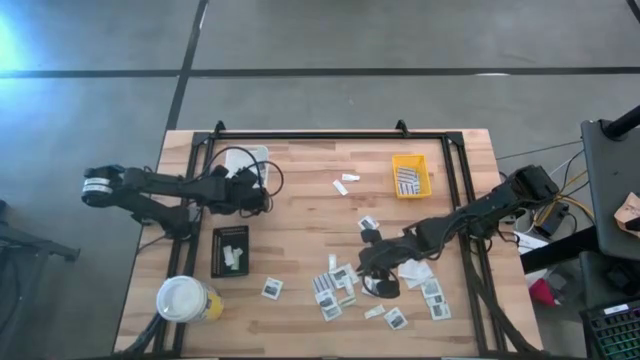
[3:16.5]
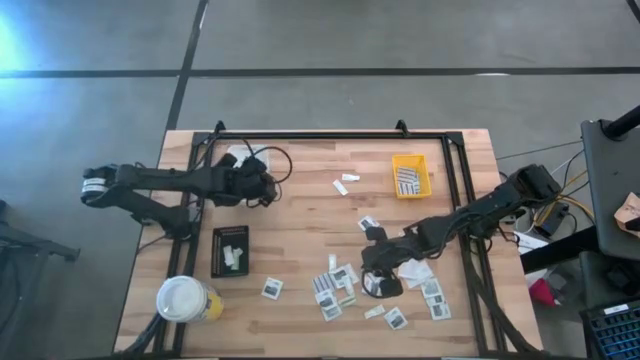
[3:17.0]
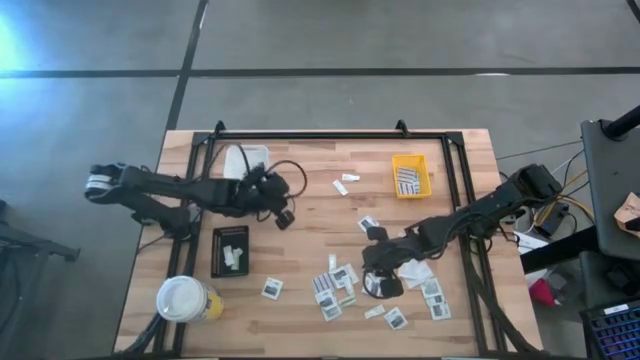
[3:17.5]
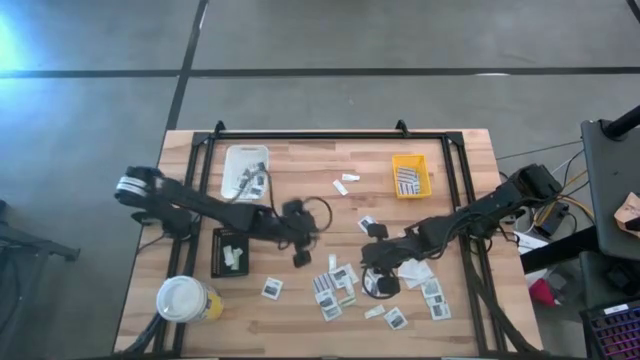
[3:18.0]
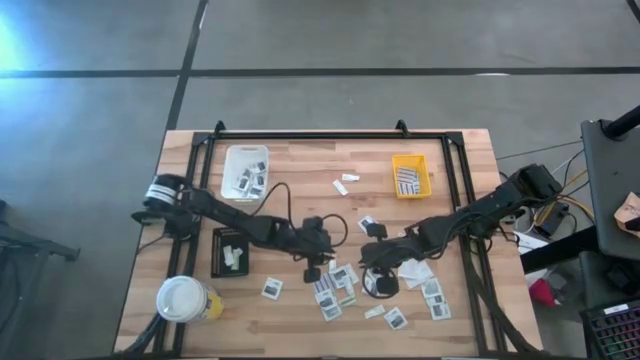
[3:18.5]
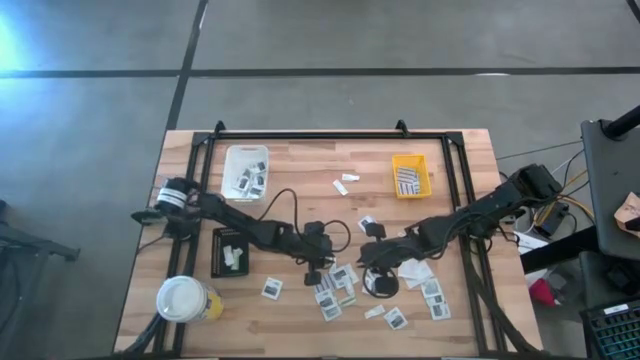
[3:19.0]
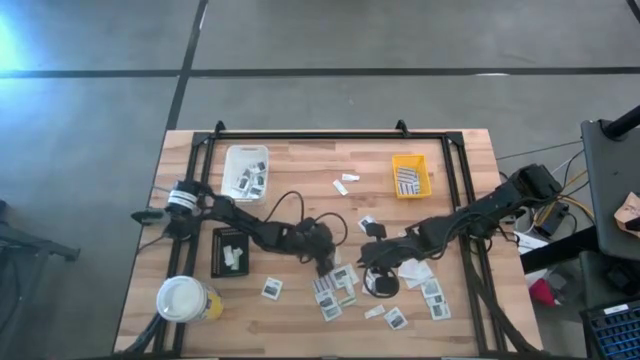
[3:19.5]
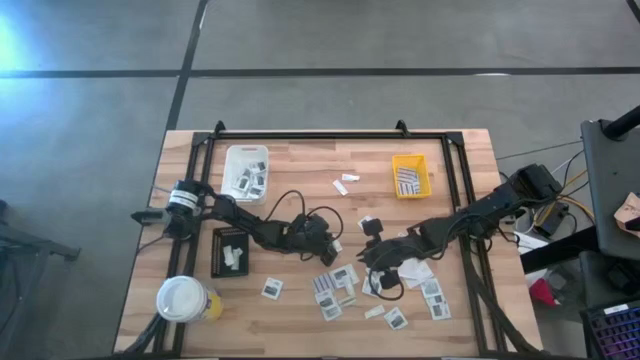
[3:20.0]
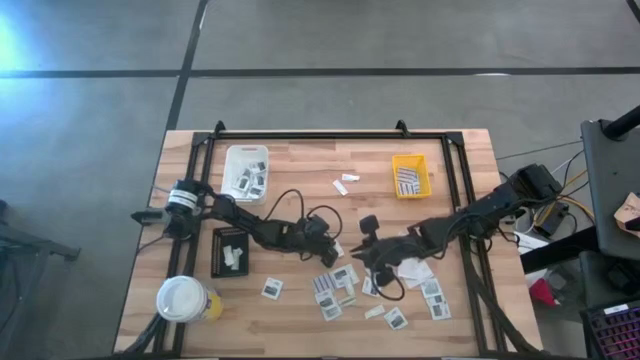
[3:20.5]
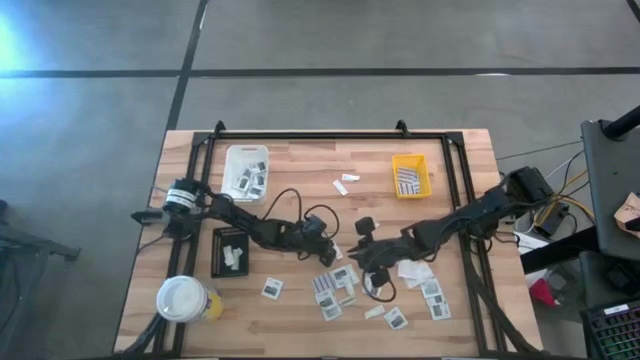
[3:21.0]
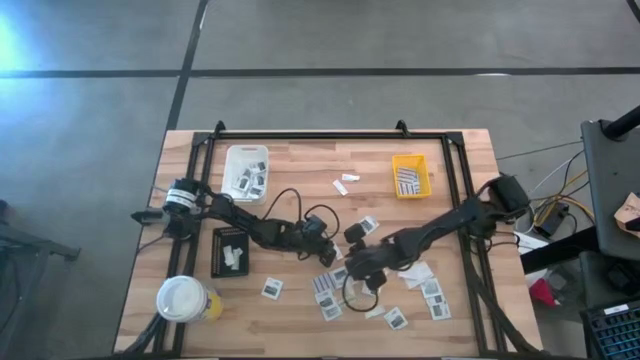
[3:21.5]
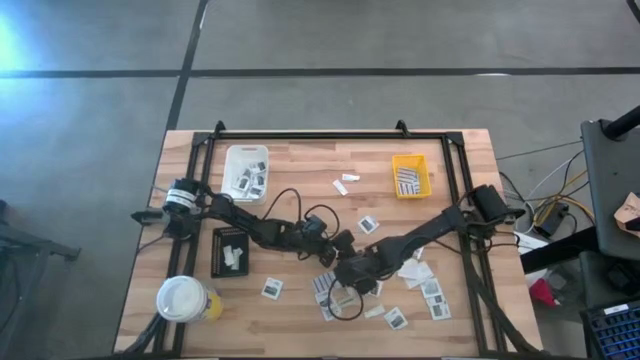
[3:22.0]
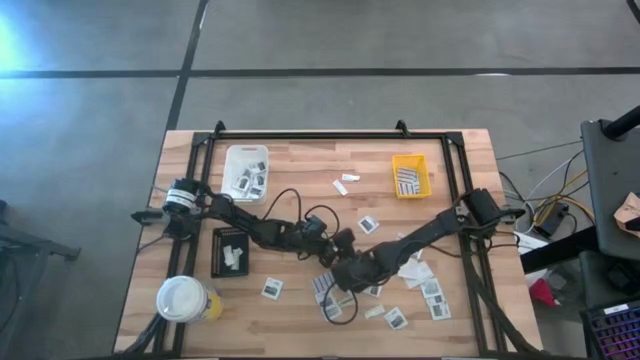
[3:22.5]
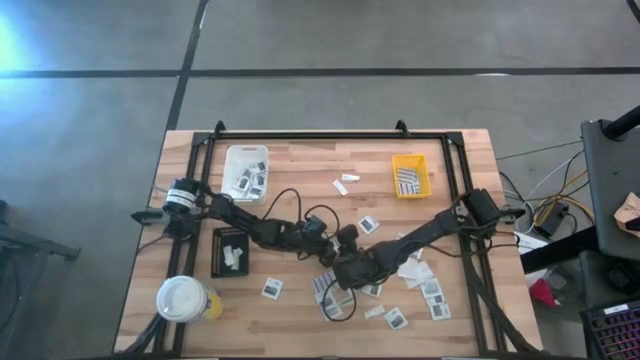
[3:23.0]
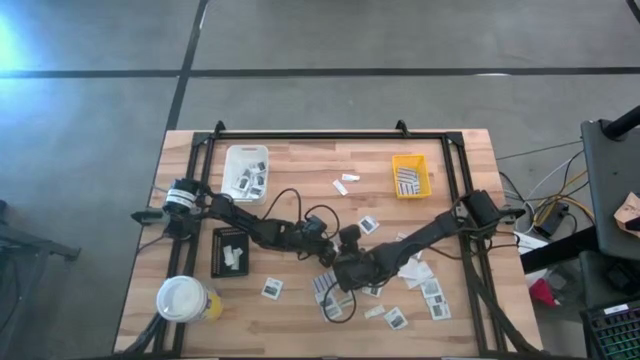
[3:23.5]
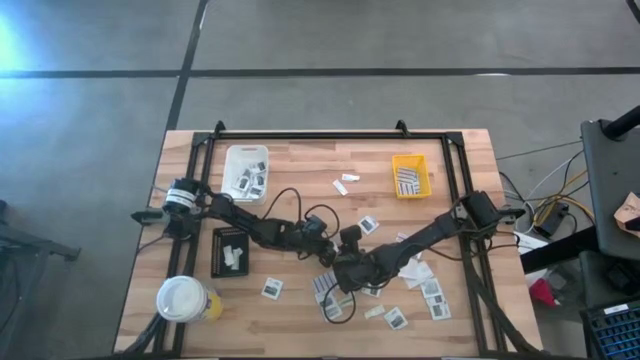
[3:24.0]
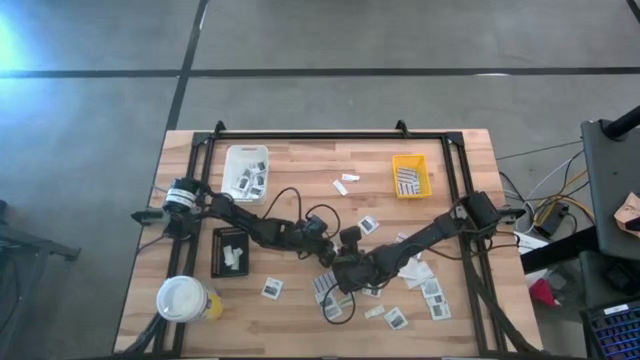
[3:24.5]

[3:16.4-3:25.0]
Task: Pick & Place First Aid Supplies
Put the green bandage pack into the black bin

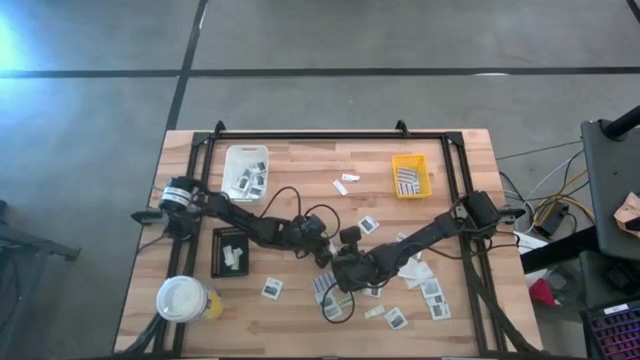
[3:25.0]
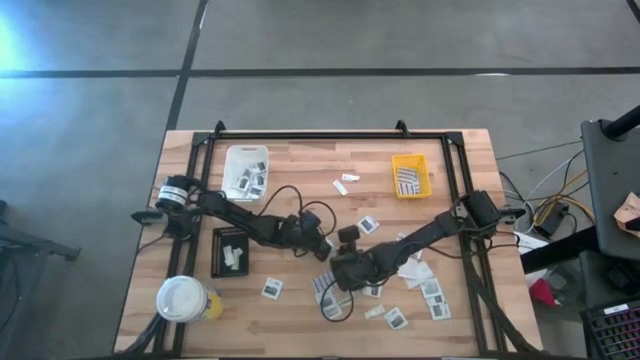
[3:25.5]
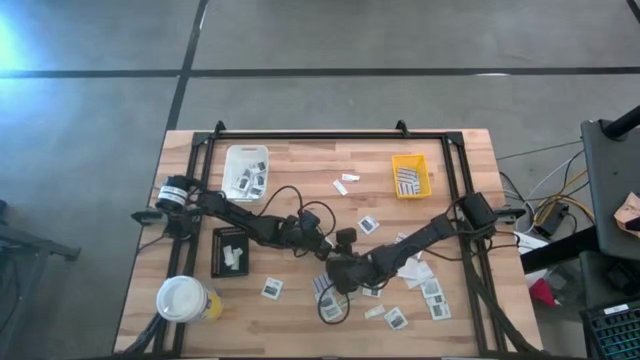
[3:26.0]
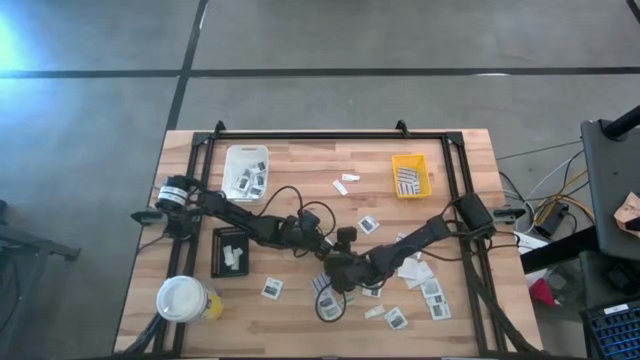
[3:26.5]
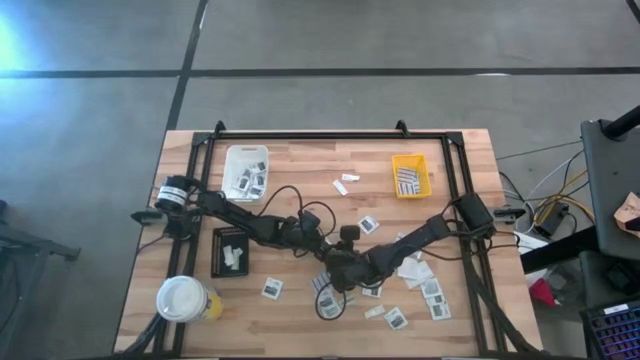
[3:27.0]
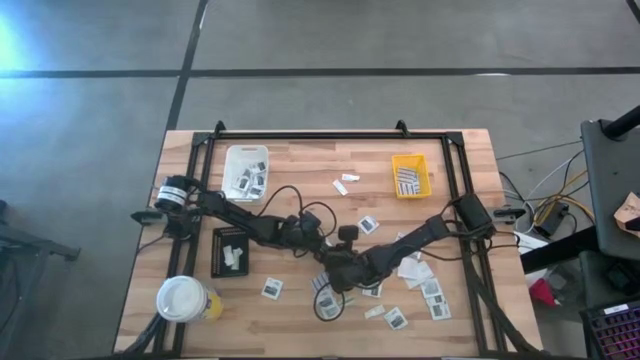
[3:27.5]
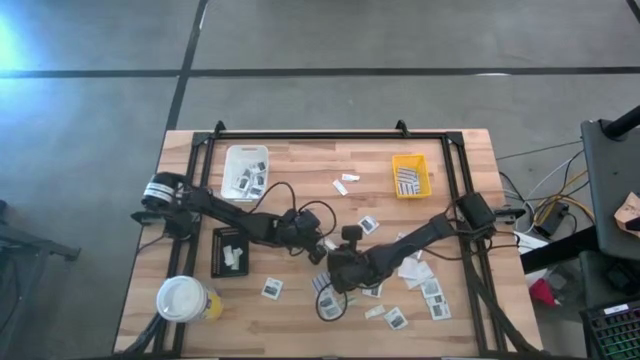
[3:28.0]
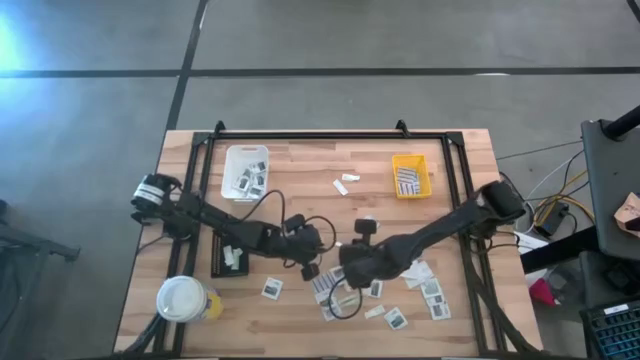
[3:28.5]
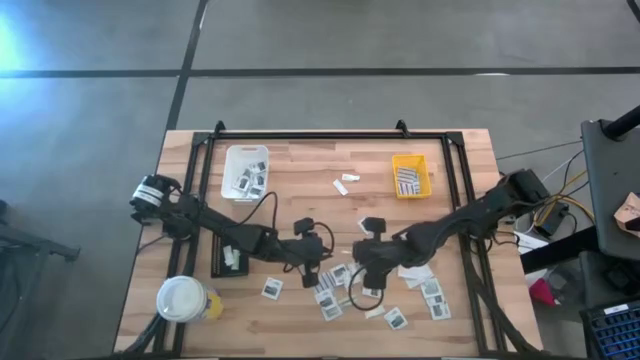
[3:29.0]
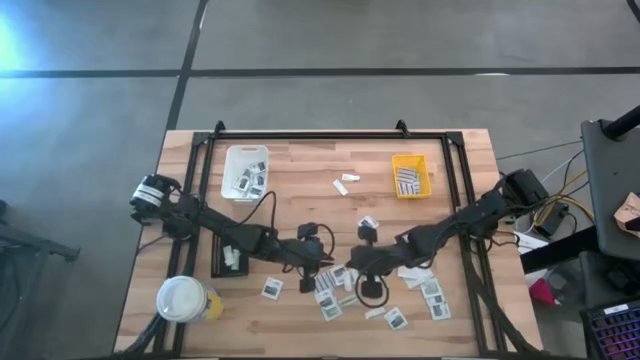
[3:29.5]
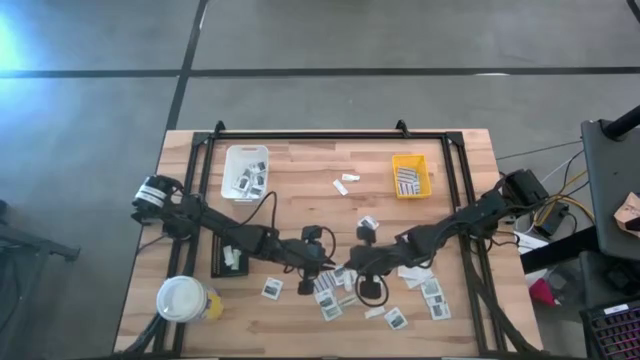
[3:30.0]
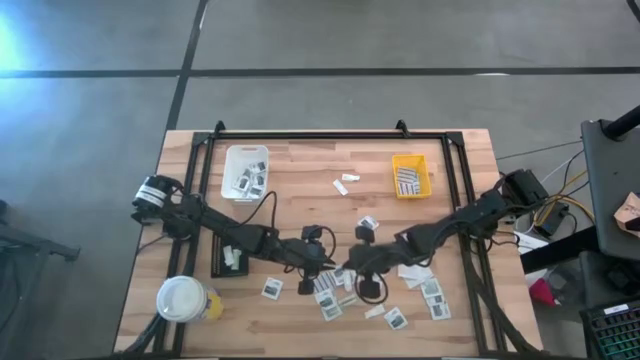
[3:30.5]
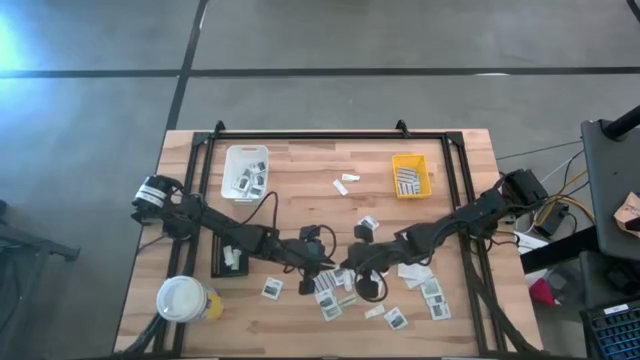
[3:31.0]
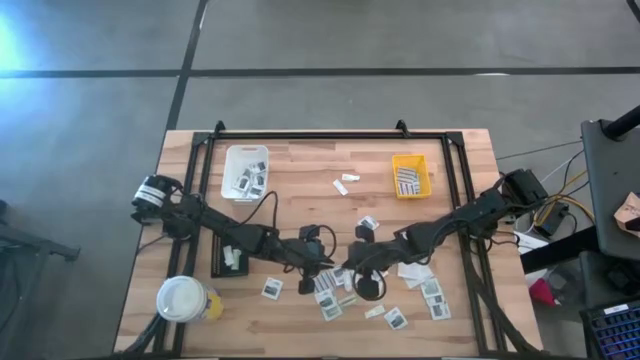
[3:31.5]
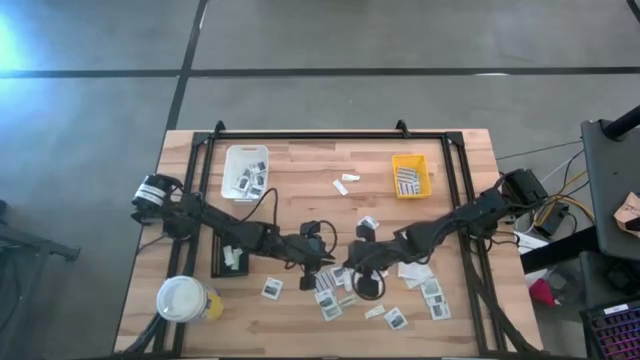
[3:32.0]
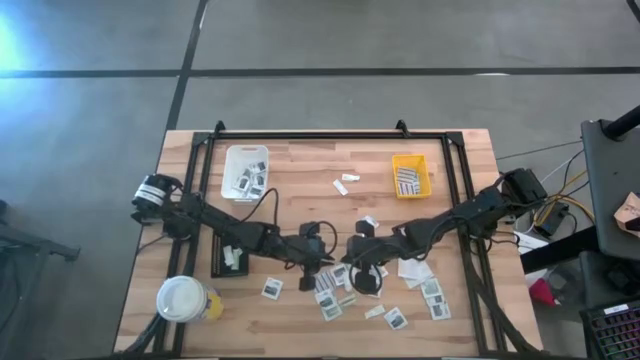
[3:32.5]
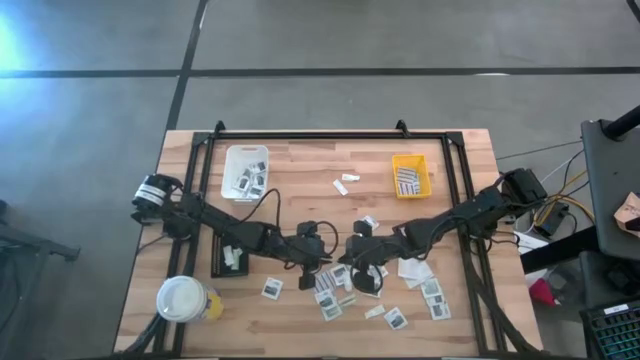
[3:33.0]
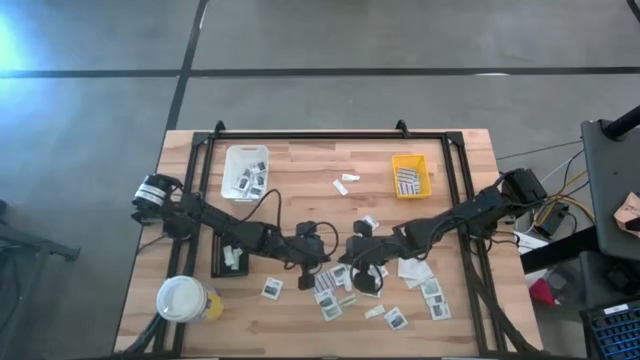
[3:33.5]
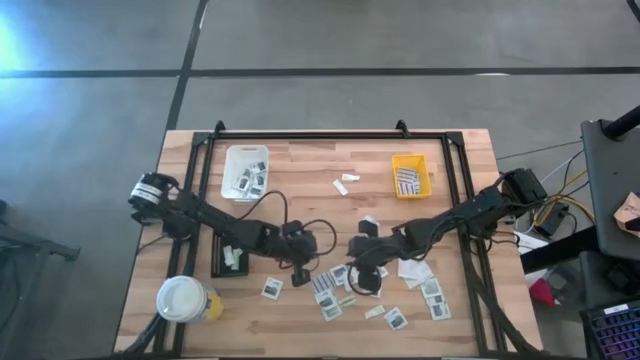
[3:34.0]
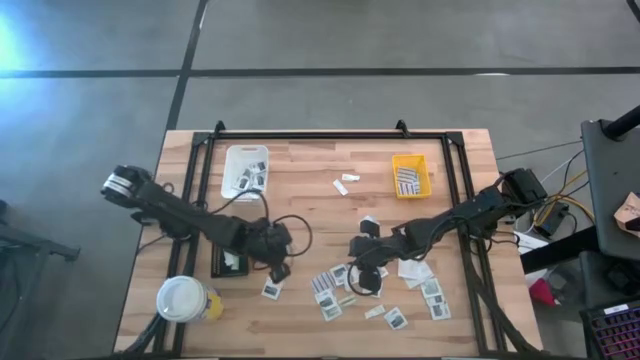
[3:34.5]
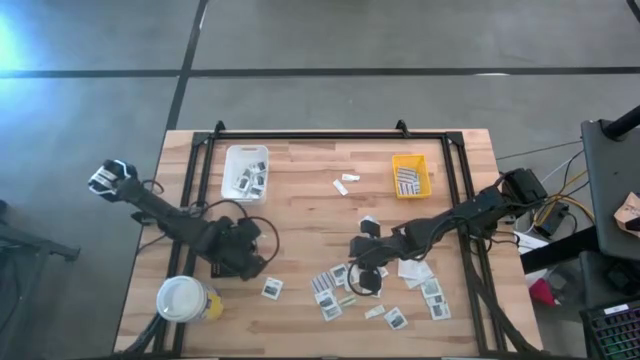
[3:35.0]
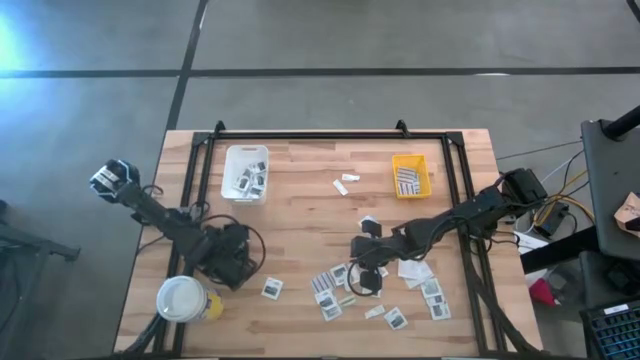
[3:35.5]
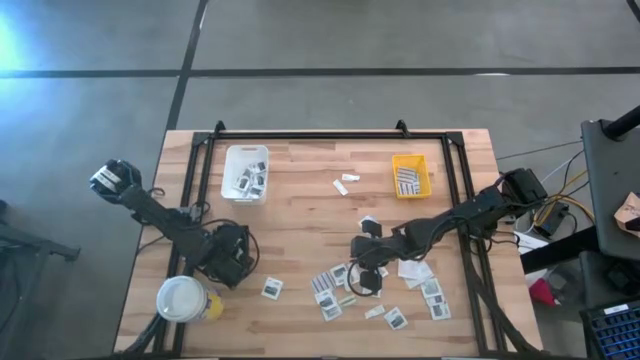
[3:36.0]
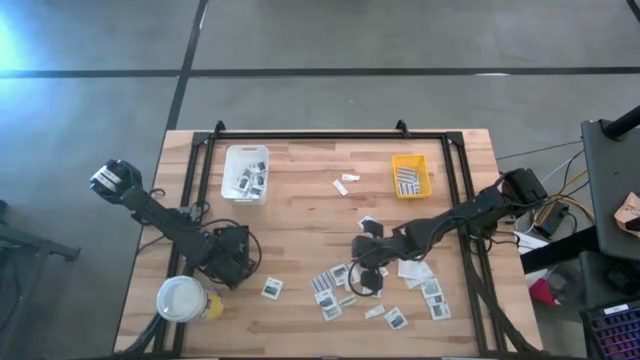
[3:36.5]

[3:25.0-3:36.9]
Put the green bandage pack into the black bin
